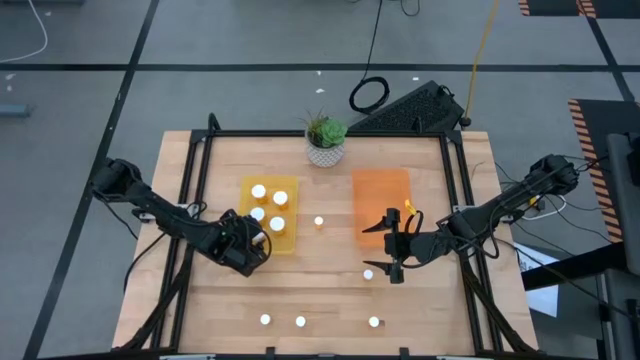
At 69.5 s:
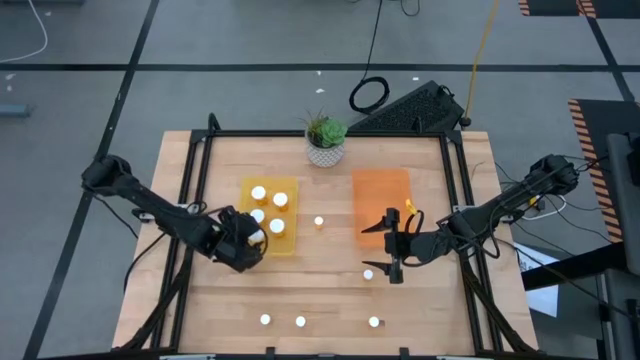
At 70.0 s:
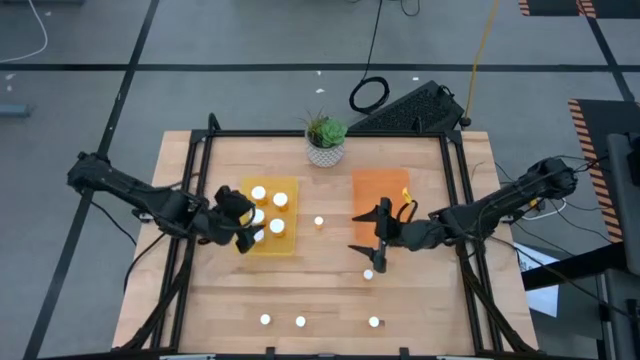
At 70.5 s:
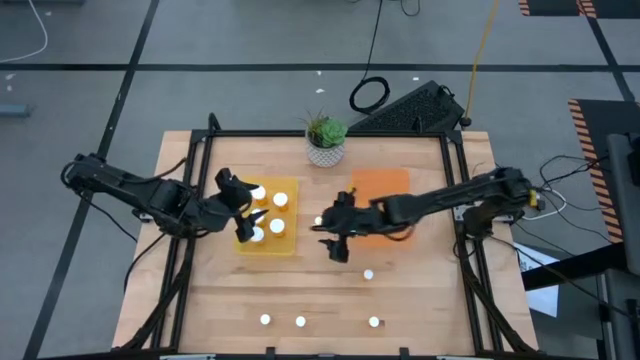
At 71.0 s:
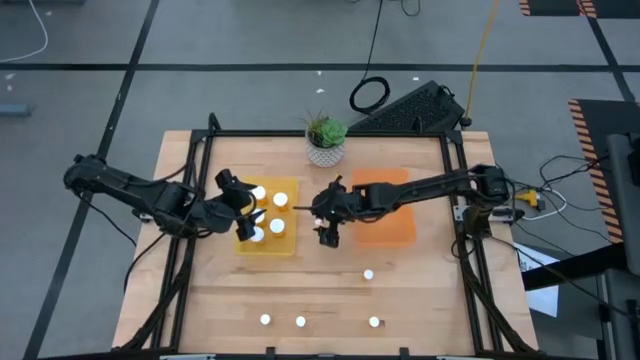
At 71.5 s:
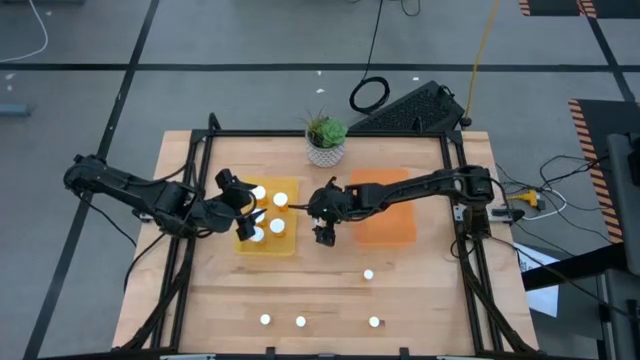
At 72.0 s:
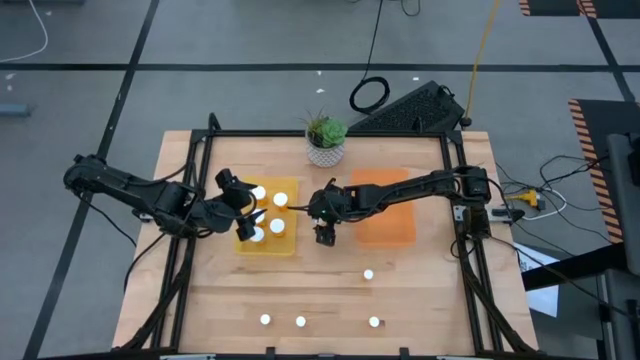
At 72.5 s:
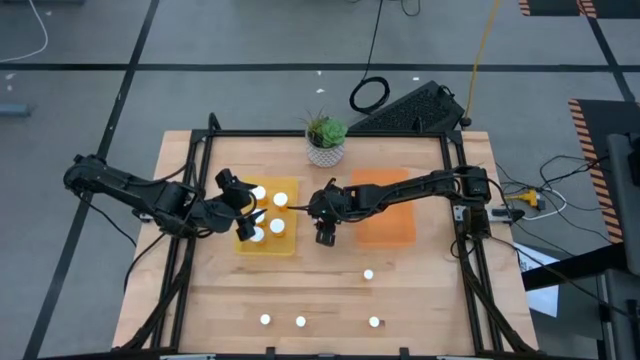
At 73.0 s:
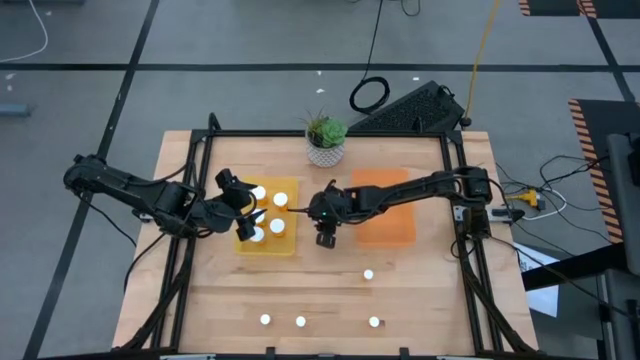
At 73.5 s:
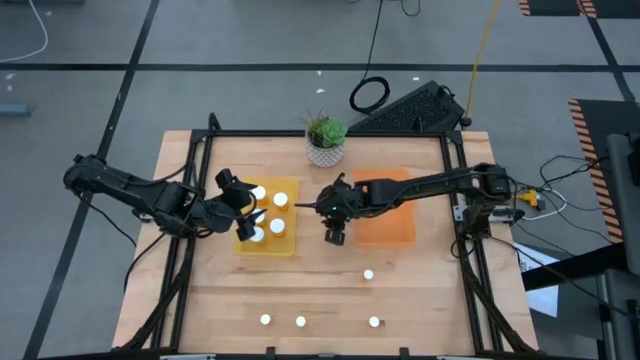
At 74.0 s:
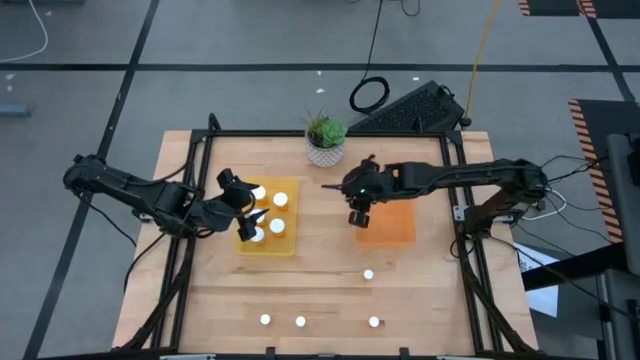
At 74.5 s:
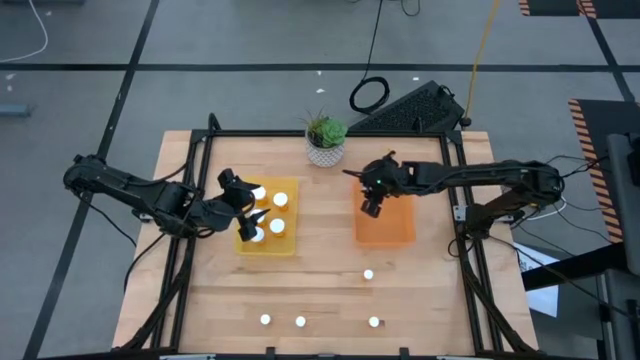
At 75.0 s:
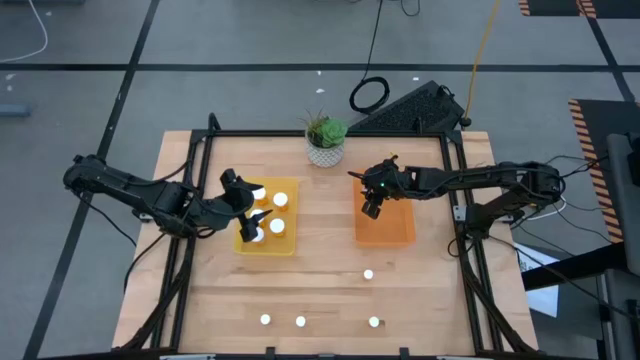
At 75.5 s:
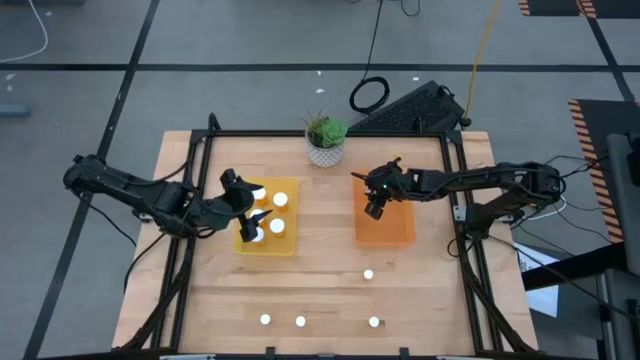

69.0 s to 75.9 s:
Task: Pick and place medicine bottles into bin by pill shape (circle, oval)
Put the small medicine bottle into the orange bin

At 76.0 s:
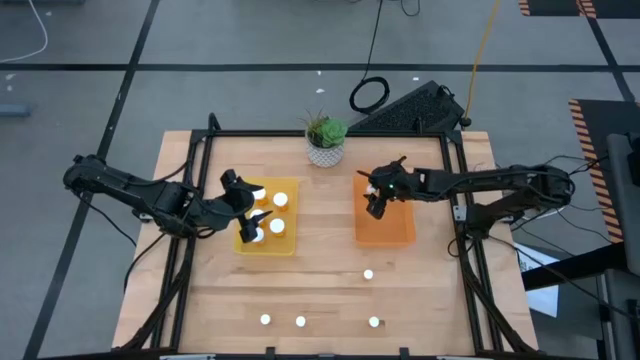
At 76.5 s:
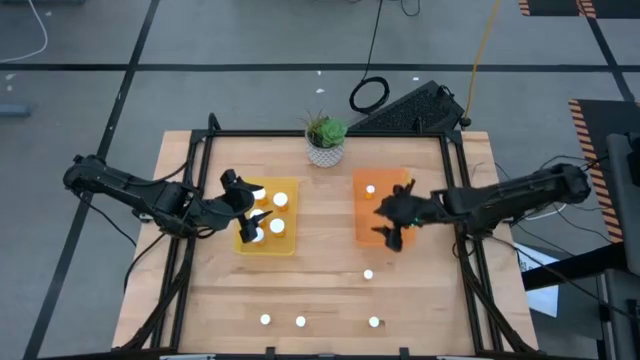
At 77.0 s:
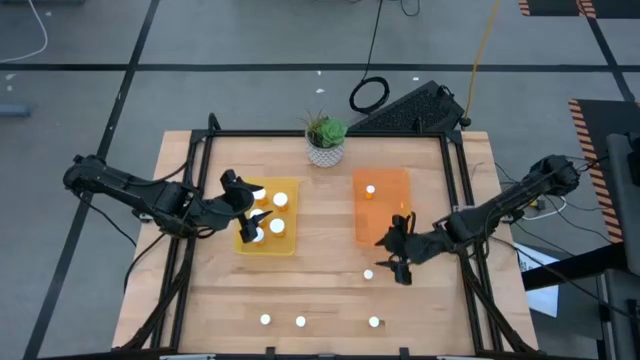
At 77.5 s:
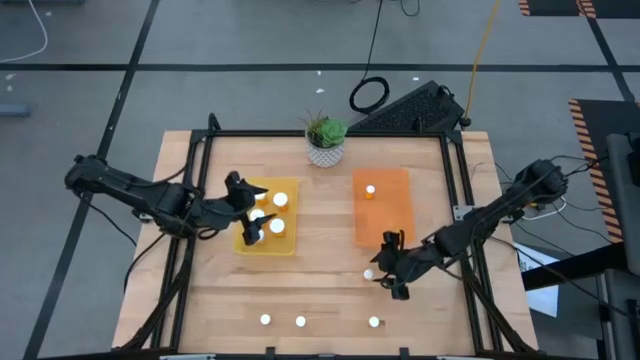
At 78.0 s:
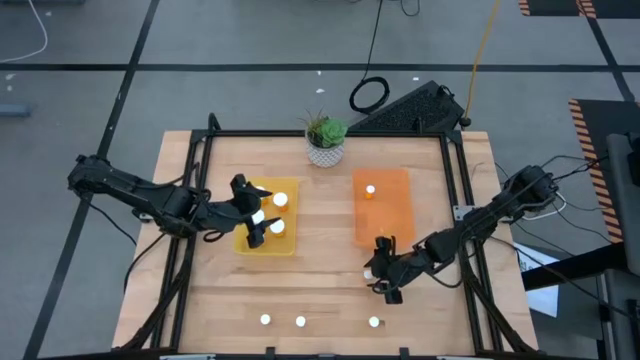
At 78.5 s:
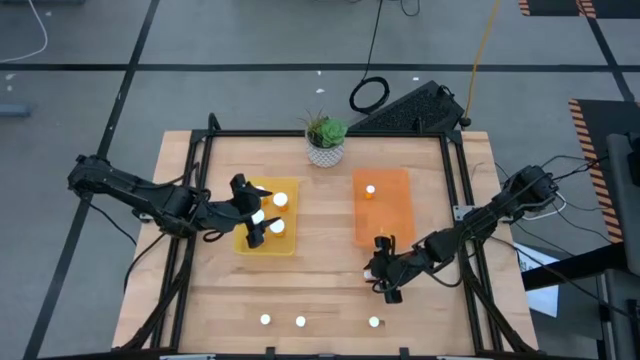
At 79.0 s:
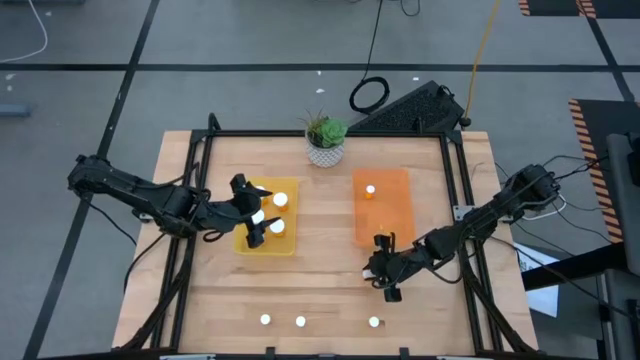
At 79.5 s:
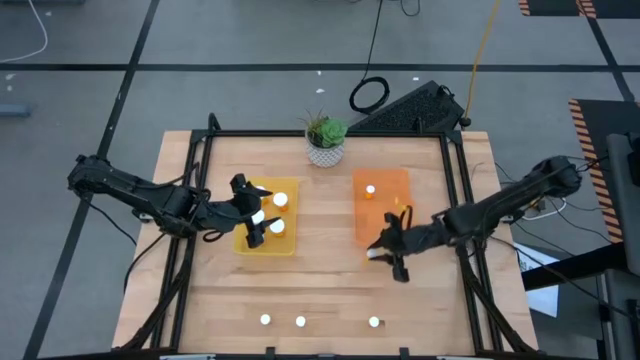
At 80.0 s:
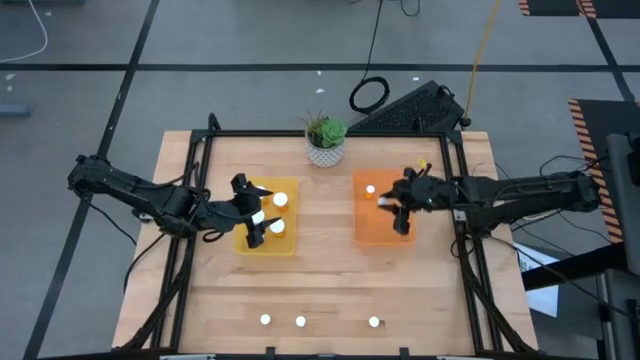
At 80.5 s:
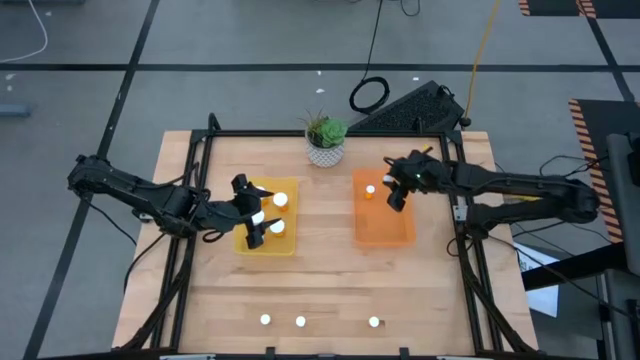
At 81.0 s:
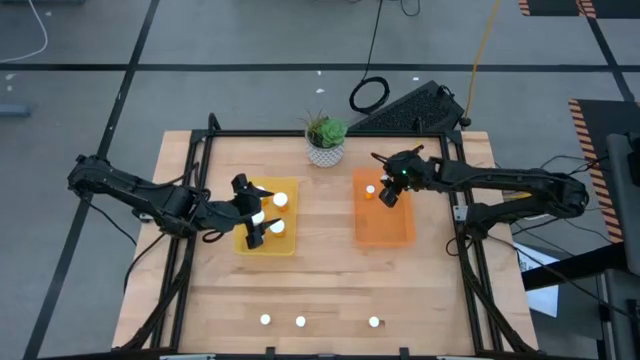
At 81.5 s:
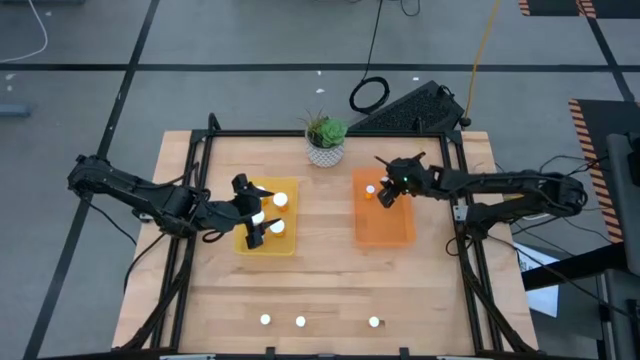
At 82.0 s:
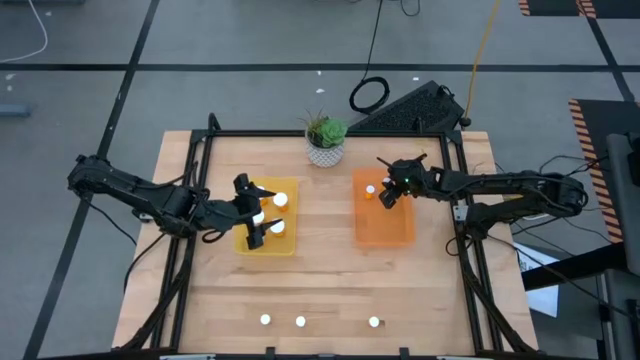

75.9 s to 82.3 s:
Put the small medicine bottle into the orange bin

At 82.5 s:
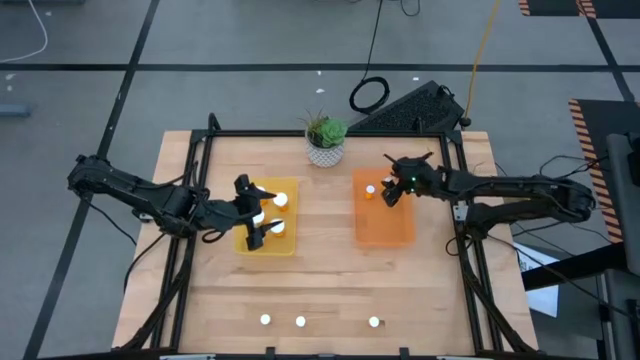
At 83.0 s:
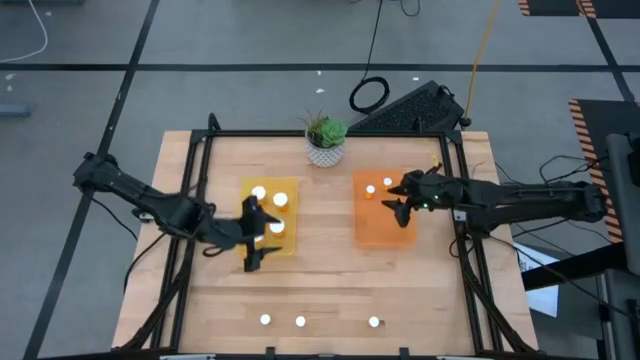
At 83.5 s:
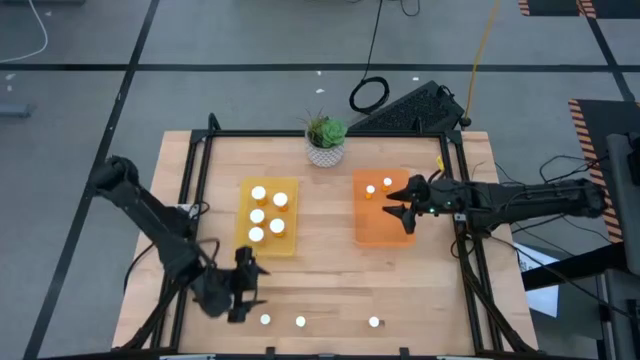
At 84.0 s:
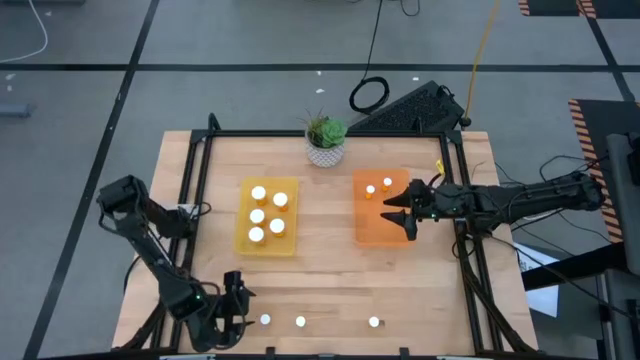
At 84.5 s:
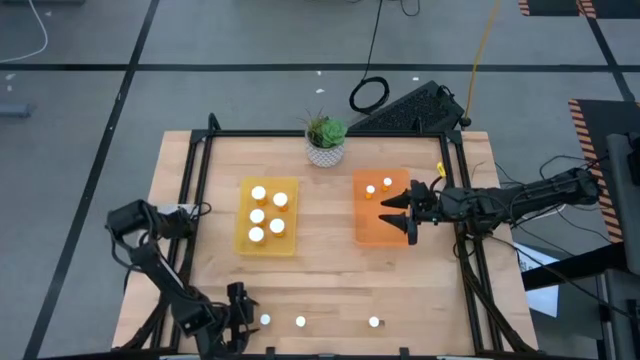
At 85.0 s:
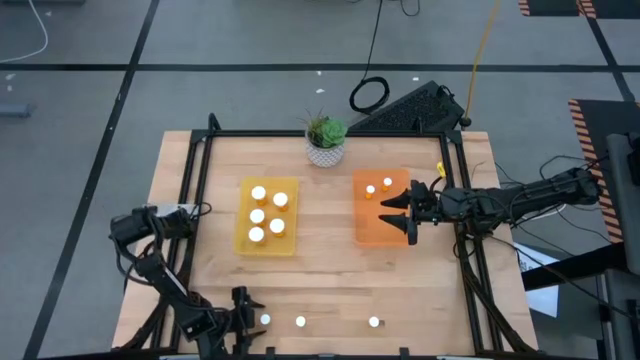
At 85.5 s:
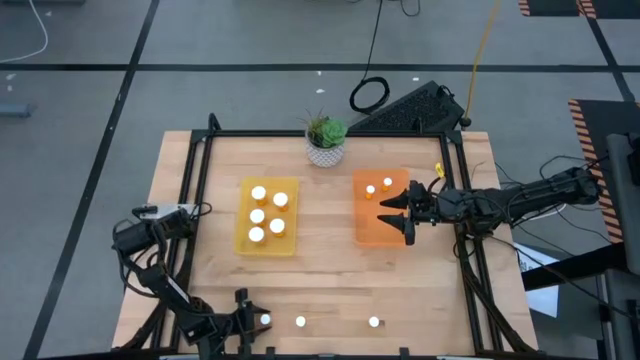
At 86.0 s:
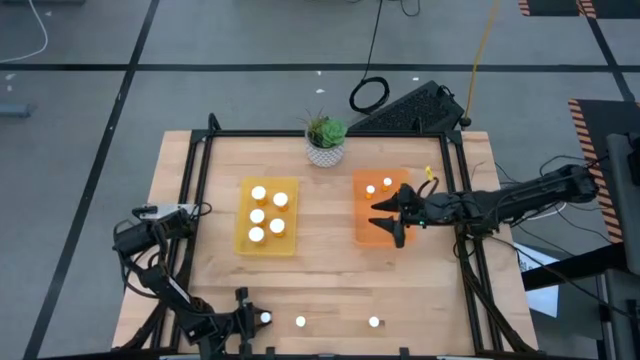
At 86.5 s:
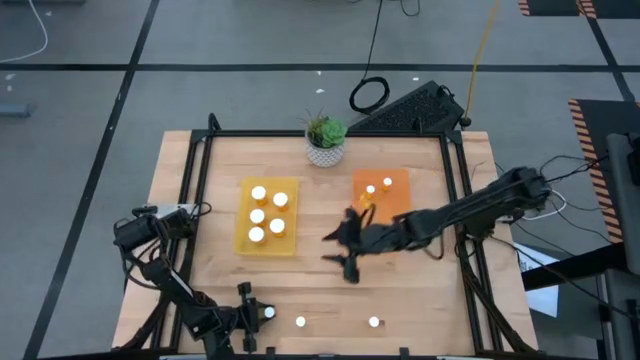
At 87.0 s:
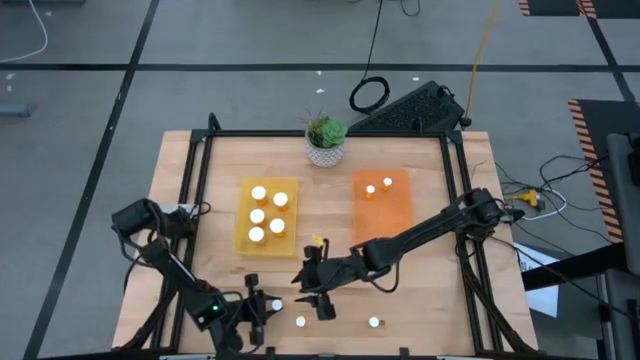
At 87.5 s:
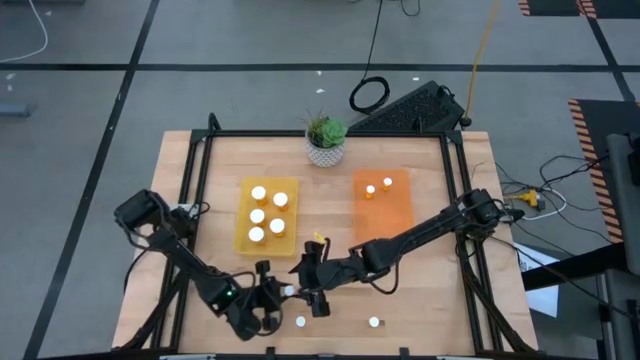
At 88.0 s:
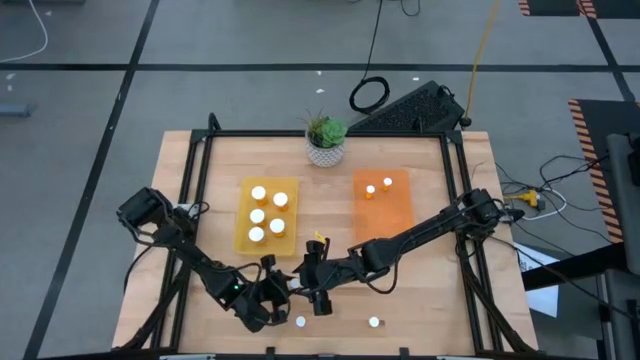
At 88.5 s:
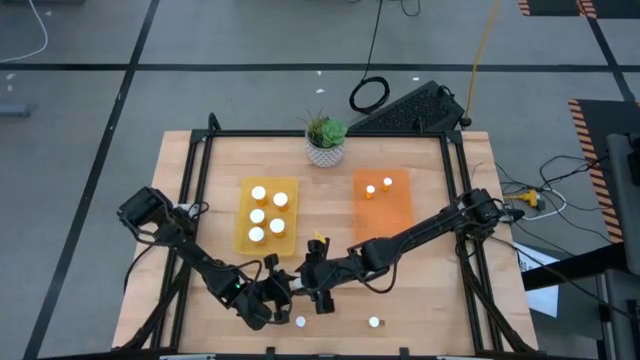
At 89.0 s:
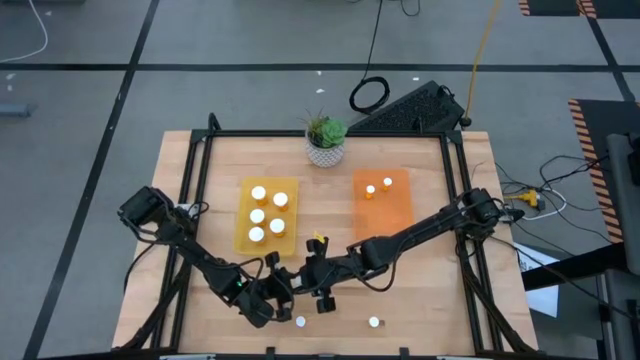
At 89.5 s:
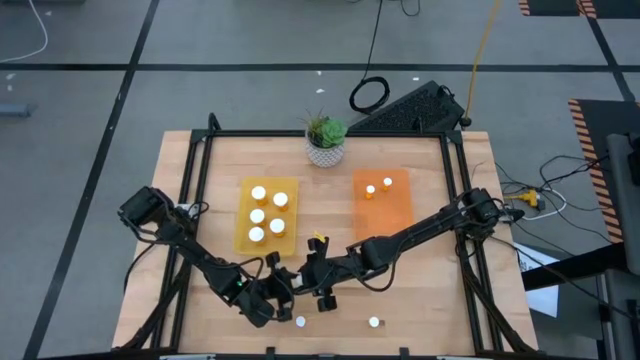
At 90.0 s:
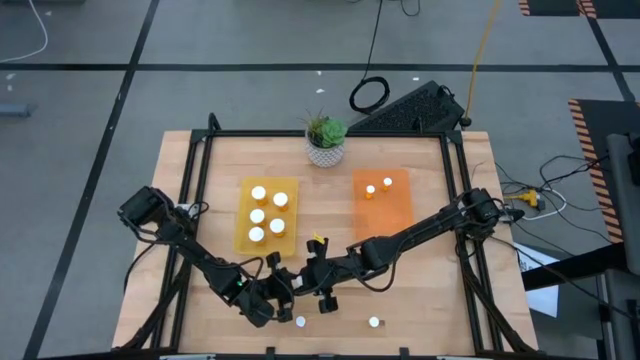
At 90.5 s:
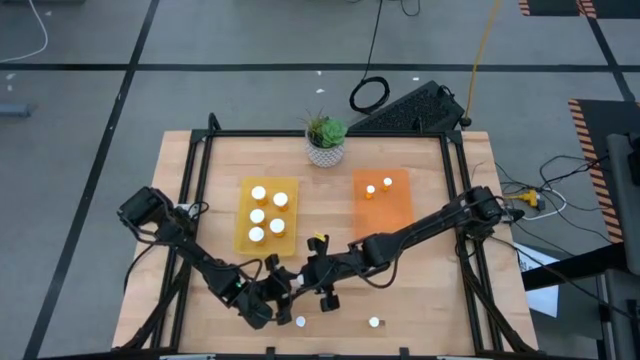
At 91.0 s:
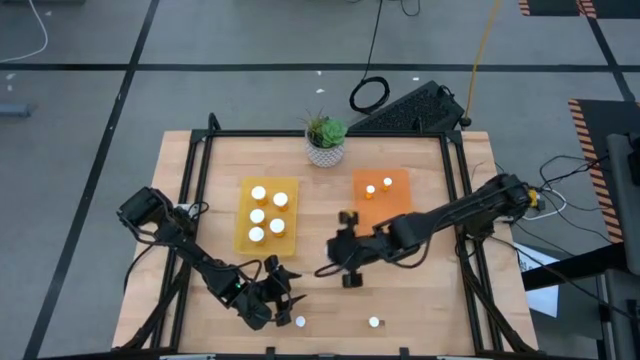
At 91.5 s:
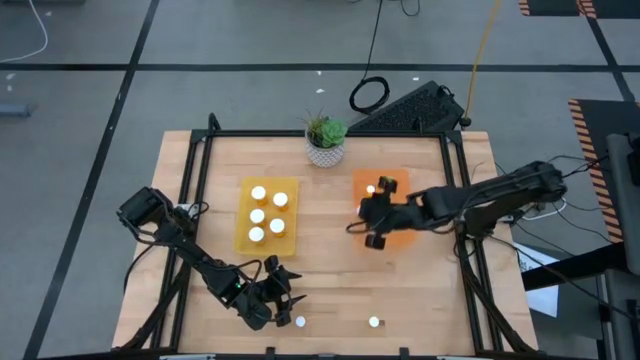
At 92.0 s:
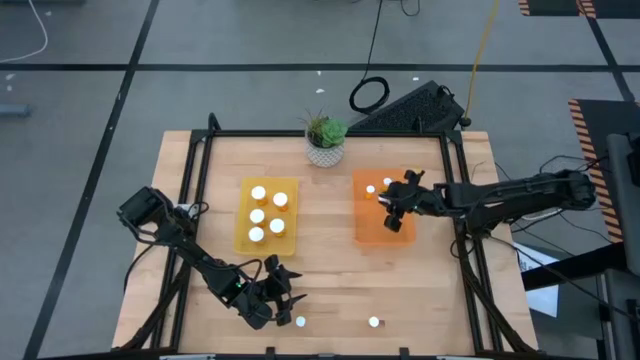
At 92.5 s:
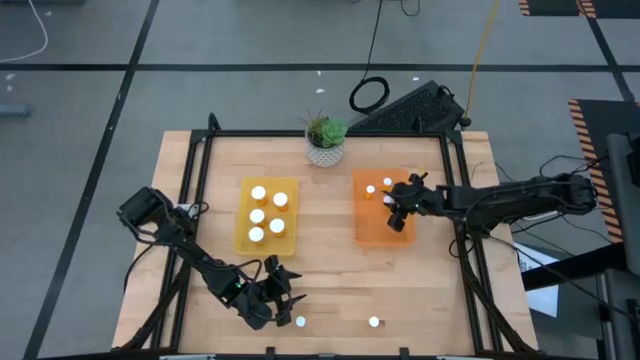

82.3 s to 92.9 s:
Put the small medicine bottle into the orange bin
